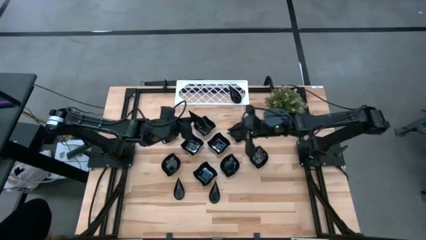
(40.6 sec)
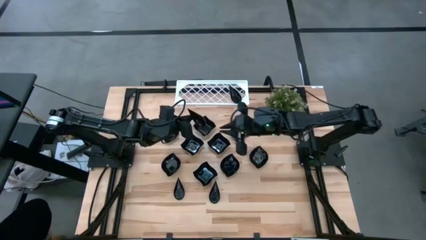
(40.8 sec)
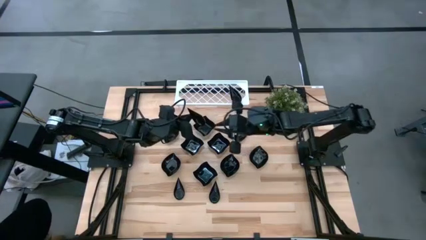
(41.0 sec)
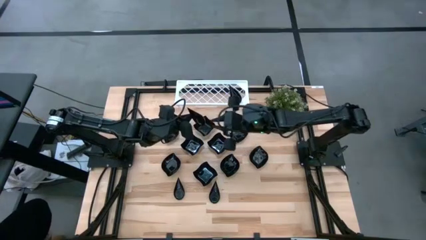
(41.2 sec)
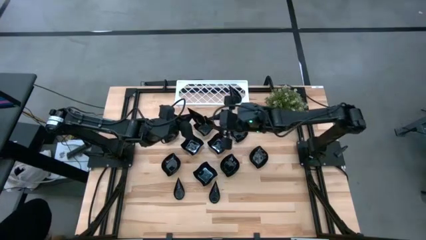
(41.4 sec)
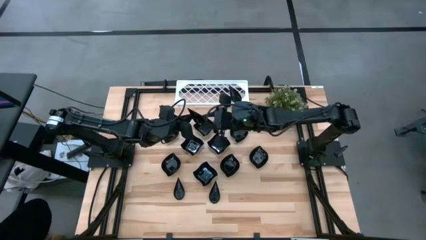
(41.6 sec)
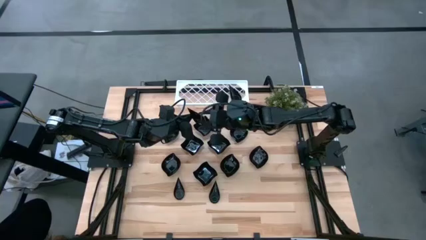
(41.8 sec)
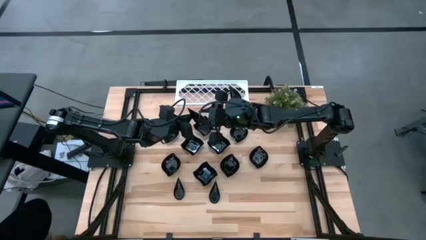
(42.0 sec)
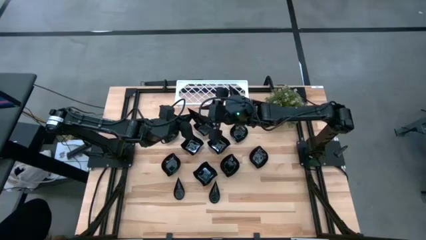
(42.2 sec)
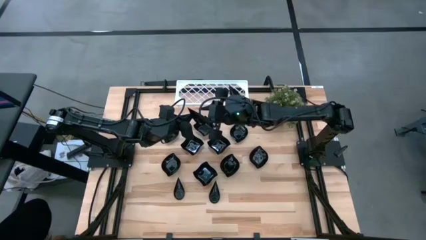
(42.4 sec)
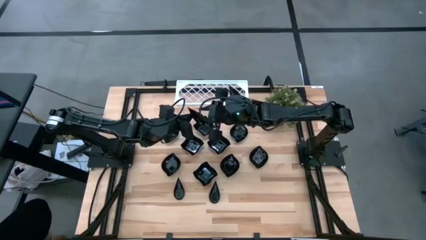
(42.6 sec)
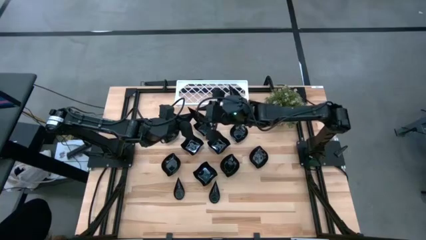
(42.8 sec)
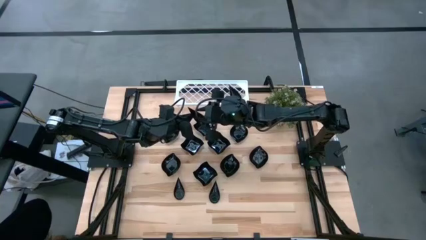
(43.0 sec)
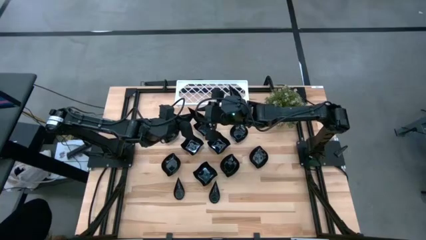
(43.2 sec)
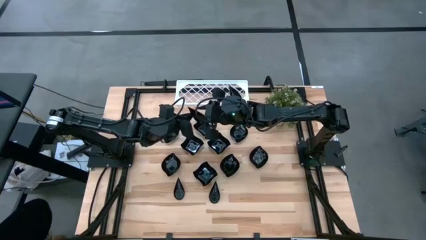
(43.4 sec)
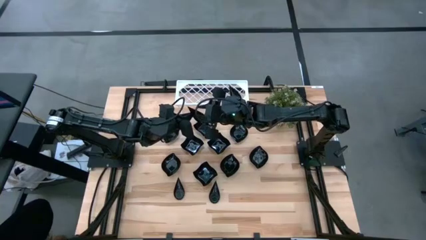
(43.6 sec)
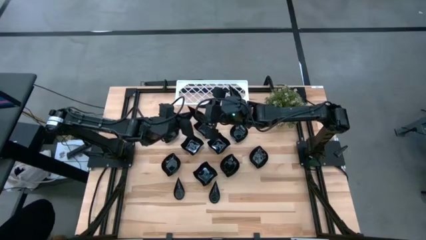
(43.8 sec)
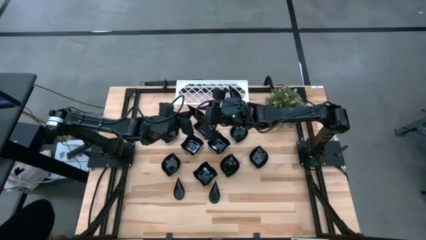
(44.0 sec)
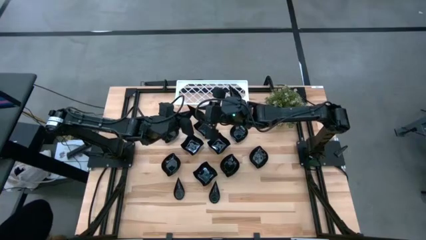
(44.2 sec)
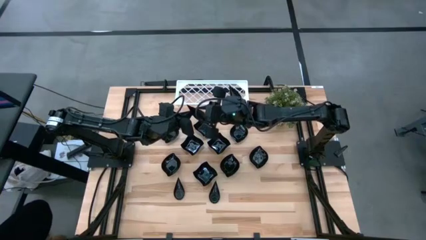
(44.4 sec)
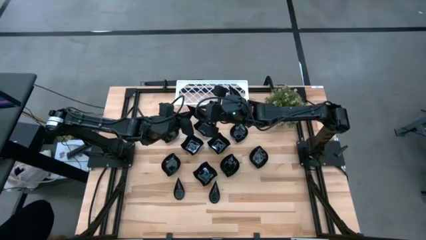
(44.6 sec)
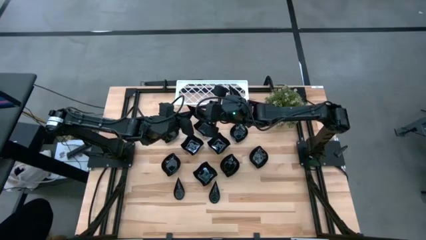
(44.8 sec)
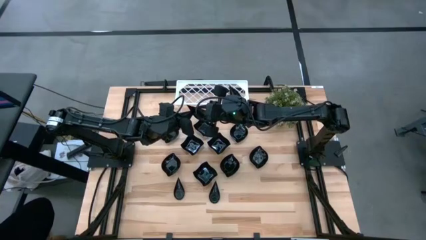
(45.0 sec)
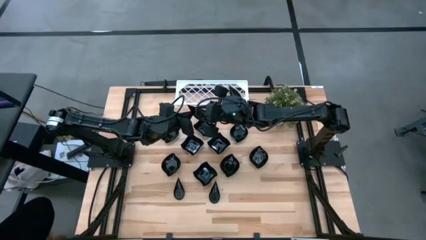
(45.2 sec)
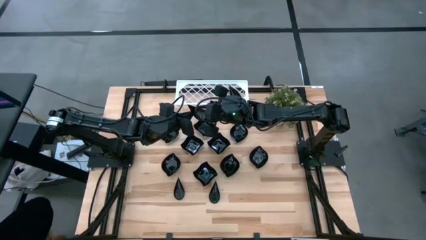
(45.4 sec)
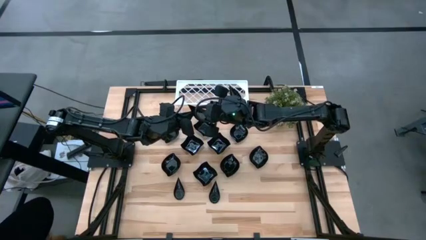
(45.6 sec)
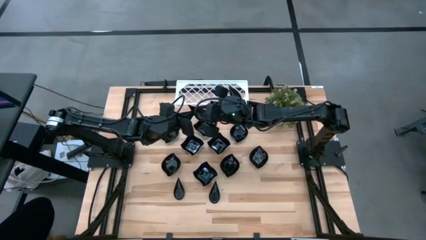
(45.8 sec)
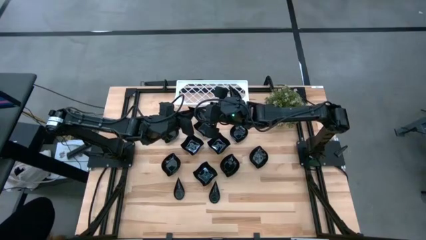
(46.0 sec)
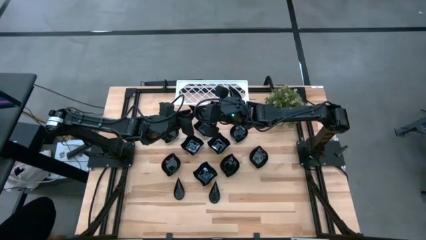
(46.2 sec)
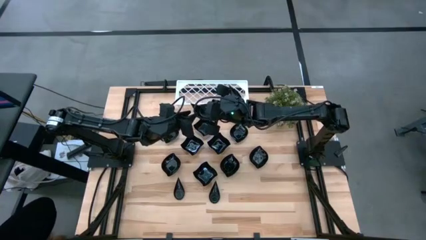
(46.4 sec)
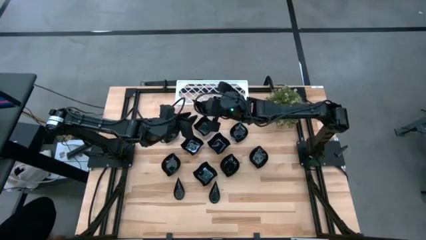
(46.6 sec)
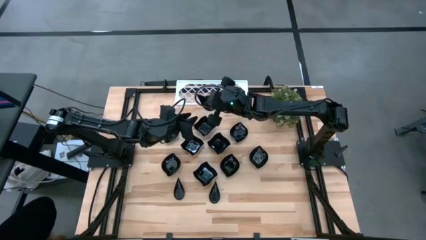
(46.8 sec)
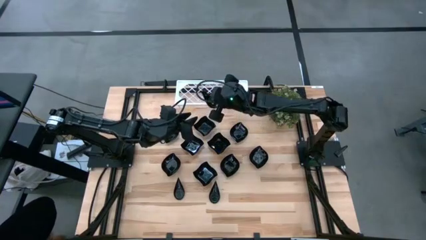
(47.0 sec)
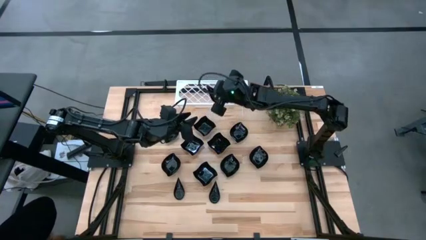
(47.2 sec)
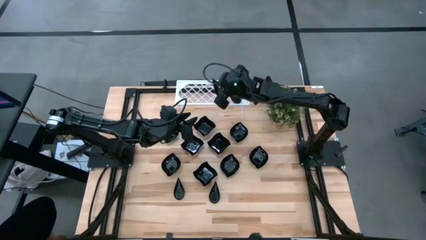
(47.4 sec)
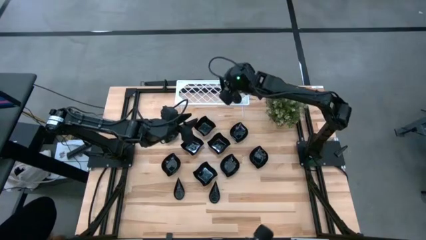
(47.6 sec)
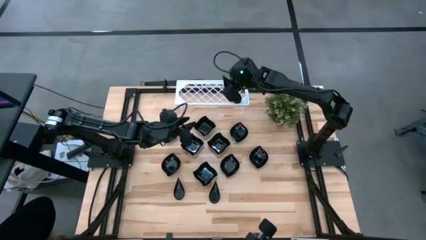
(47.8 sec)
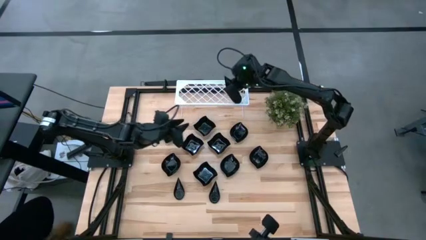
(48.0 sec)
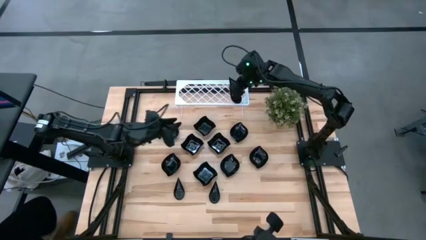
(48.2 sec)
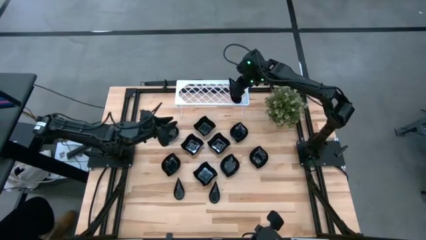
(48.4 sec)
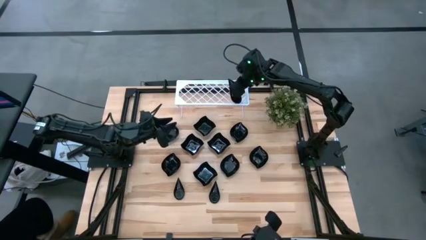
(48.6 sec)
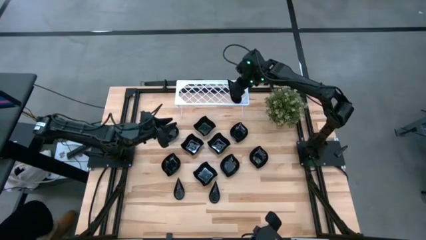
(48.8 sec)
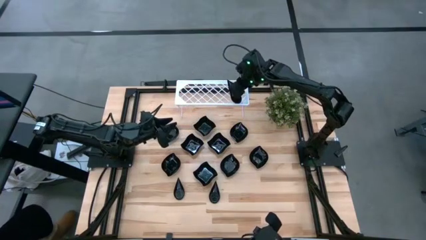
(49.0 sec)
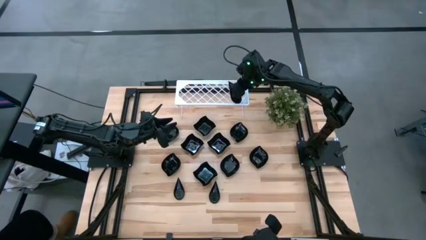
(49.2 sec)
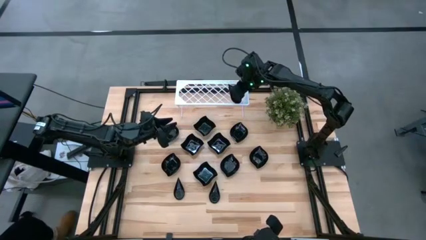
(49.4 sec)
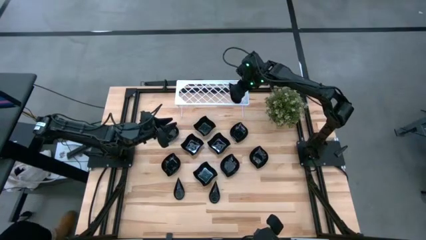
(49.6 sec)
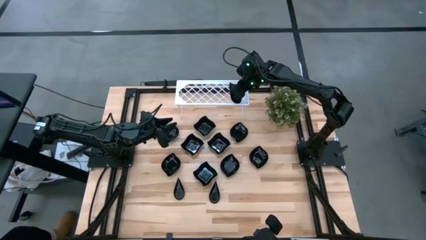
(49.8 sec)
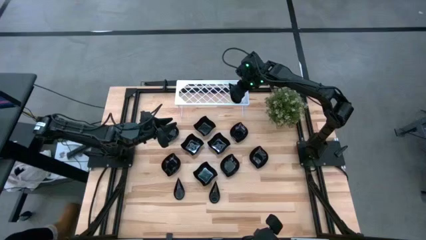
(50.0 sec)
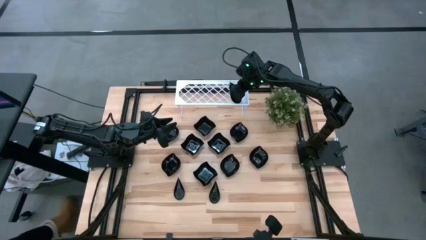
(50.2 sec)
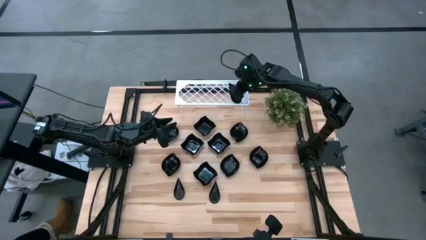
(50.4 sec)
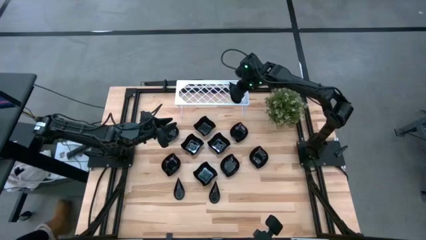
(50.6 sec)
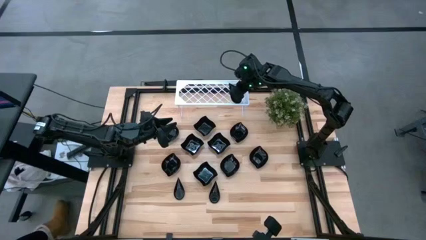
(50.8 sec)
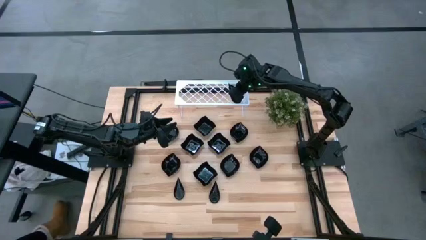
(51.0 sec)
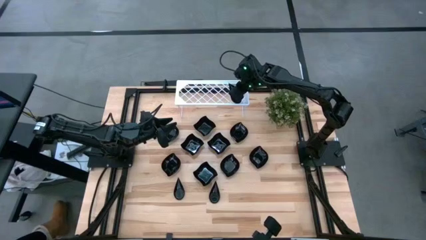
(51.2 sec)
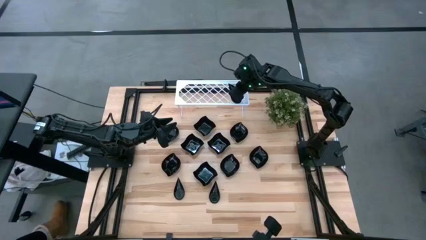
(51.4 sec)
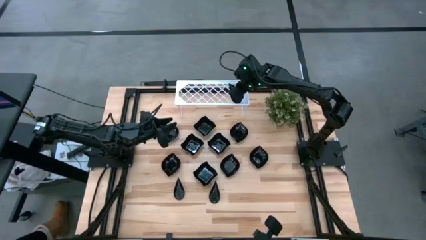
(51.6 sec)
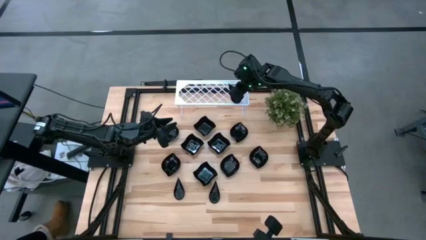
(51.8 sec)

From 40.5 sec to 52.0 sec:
Task: Pick & Place Mini shaped plates
Stack the drop-shaped plate on top of the other drop-shaped plates on the shelf
